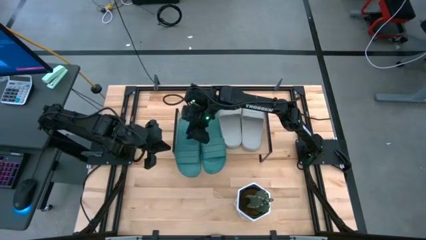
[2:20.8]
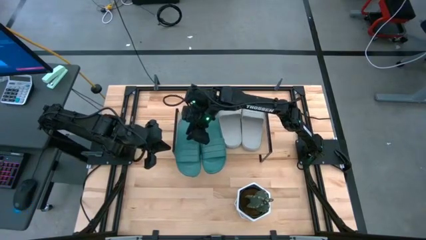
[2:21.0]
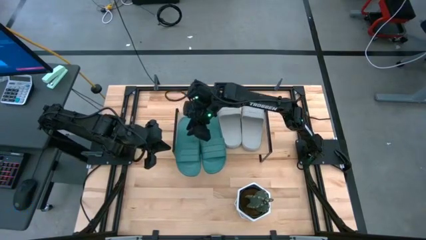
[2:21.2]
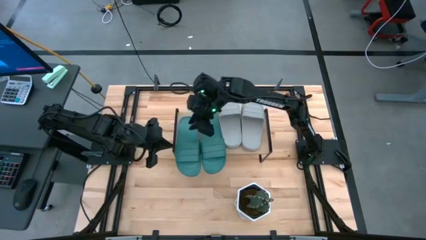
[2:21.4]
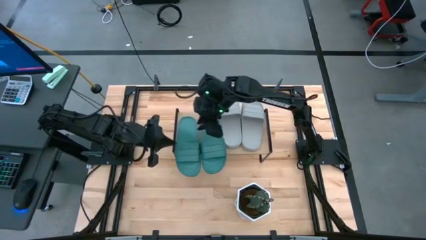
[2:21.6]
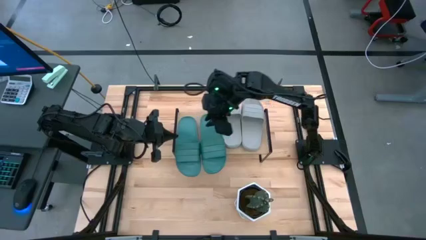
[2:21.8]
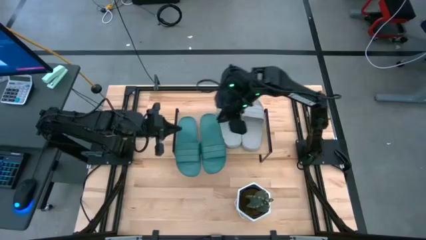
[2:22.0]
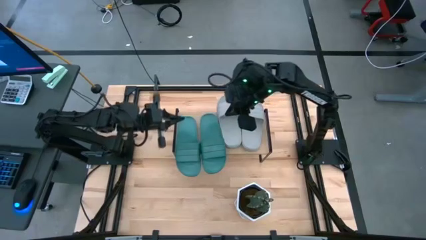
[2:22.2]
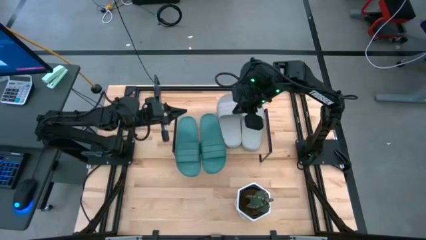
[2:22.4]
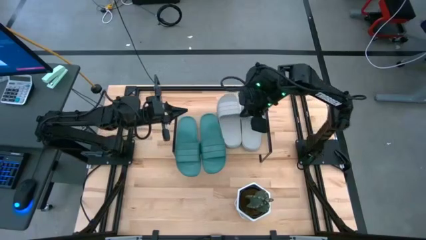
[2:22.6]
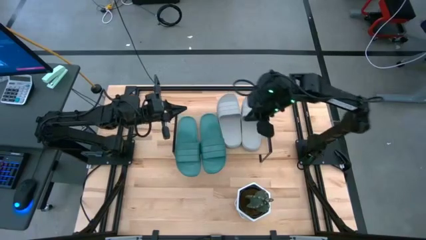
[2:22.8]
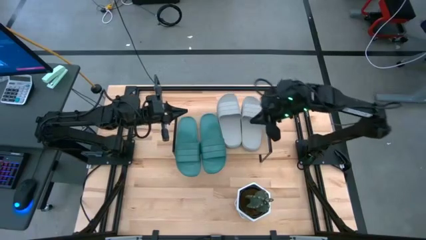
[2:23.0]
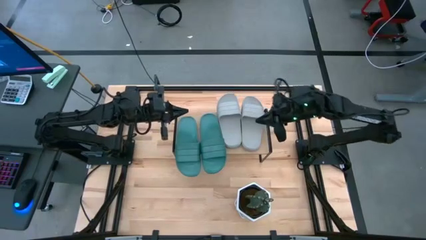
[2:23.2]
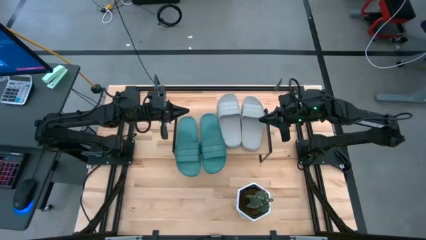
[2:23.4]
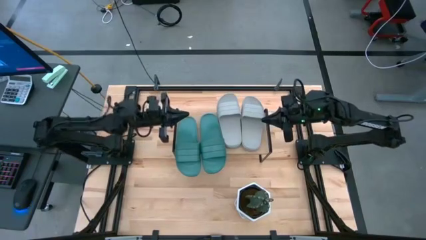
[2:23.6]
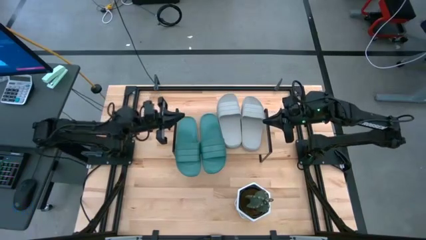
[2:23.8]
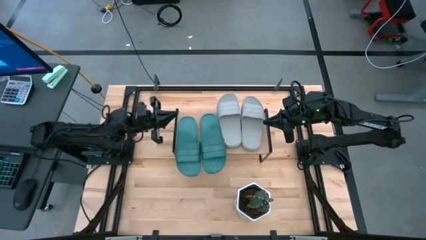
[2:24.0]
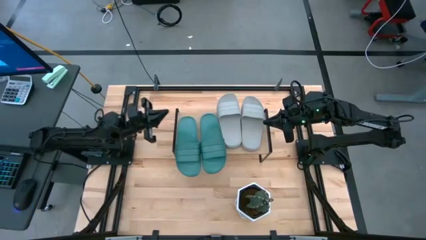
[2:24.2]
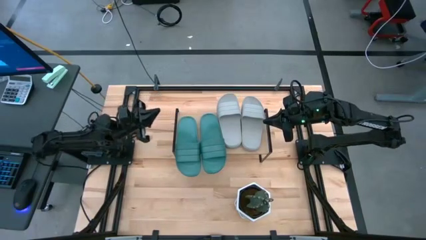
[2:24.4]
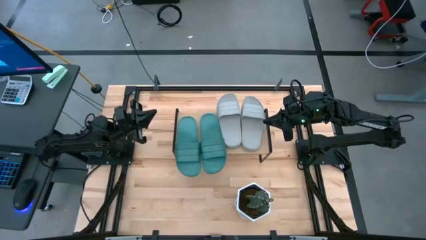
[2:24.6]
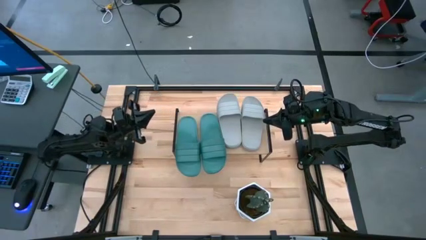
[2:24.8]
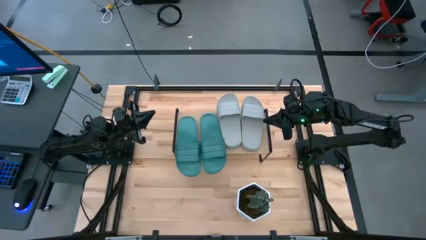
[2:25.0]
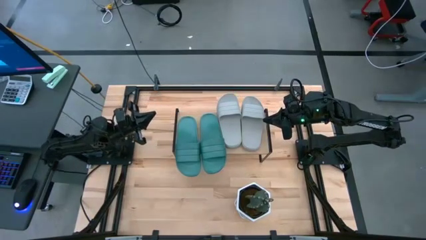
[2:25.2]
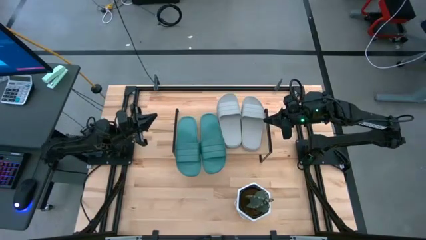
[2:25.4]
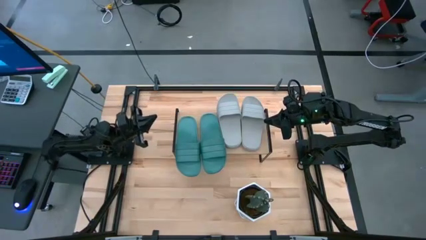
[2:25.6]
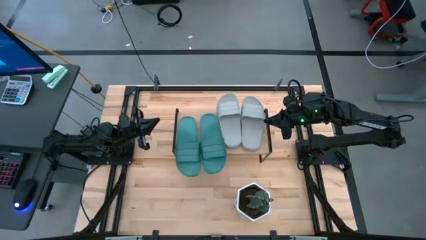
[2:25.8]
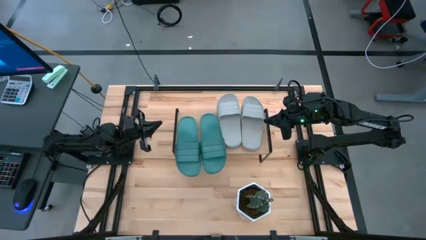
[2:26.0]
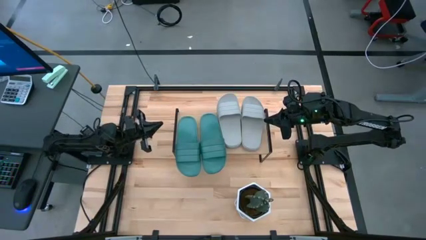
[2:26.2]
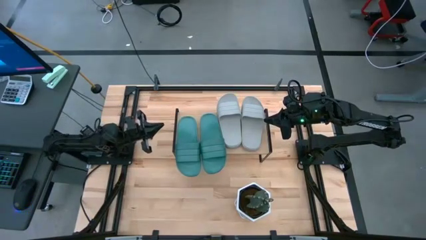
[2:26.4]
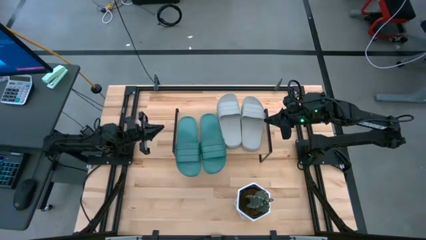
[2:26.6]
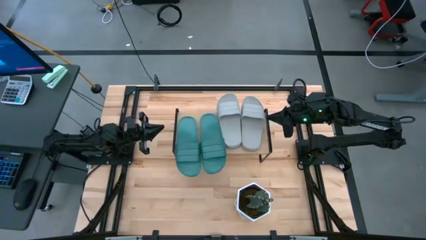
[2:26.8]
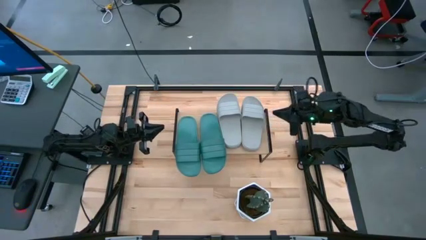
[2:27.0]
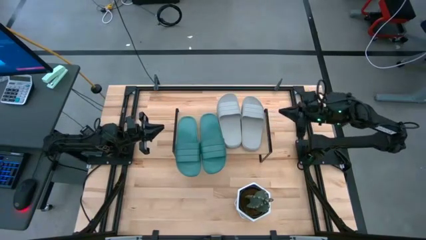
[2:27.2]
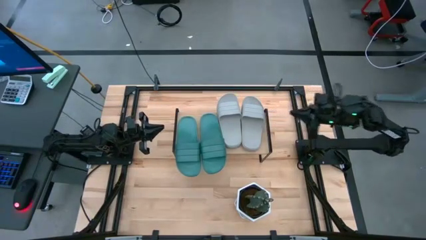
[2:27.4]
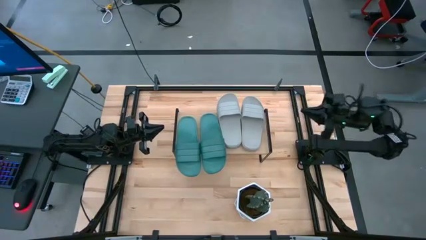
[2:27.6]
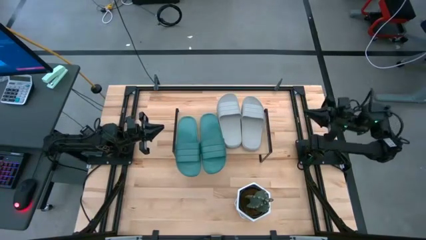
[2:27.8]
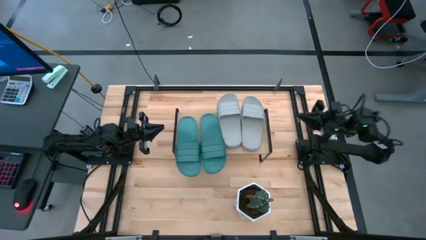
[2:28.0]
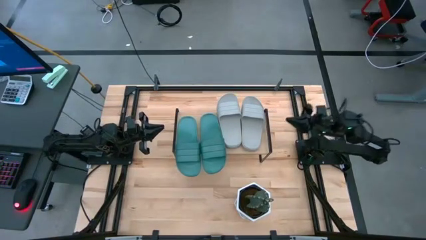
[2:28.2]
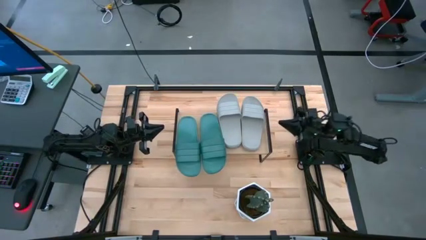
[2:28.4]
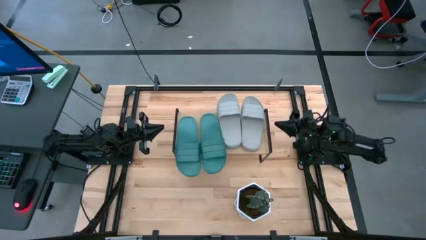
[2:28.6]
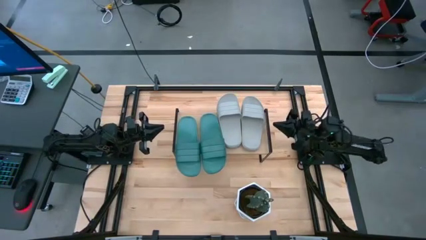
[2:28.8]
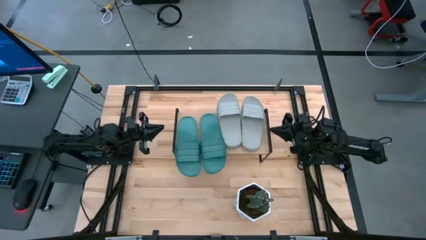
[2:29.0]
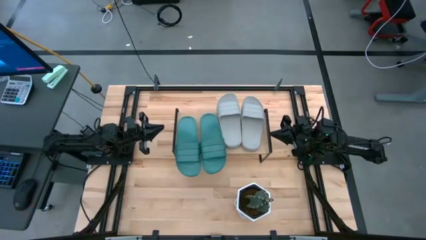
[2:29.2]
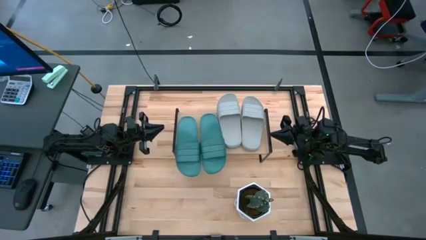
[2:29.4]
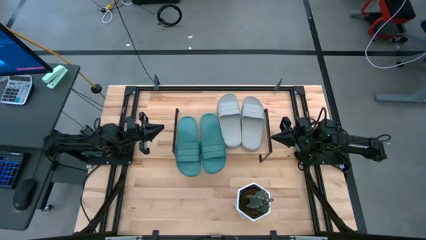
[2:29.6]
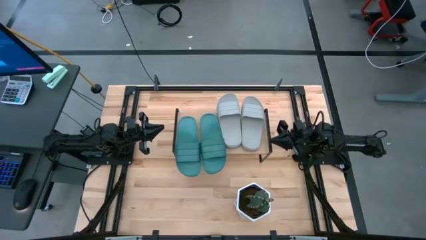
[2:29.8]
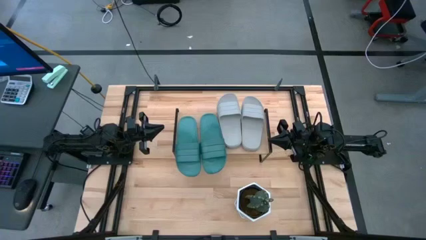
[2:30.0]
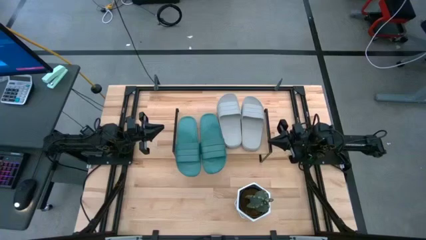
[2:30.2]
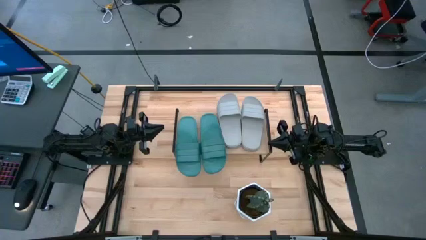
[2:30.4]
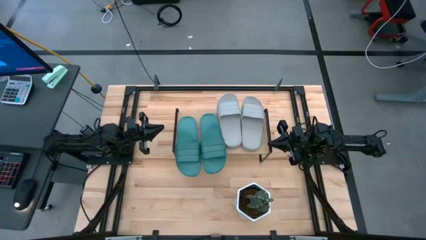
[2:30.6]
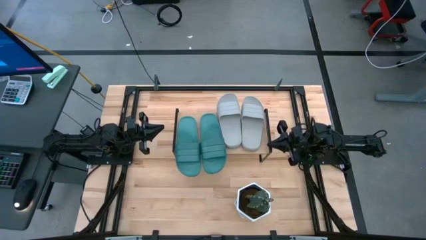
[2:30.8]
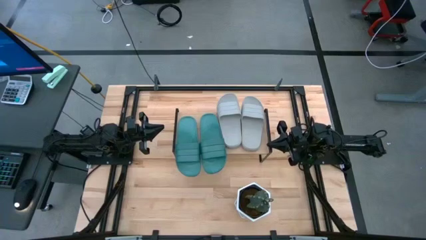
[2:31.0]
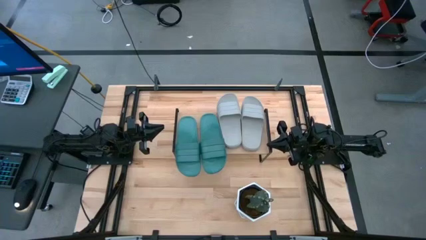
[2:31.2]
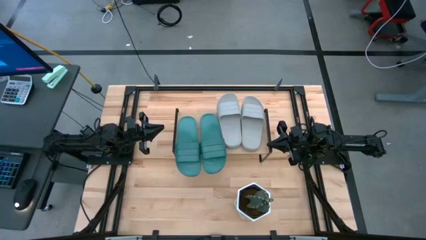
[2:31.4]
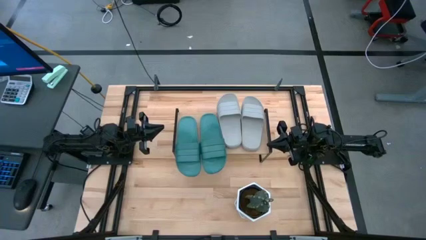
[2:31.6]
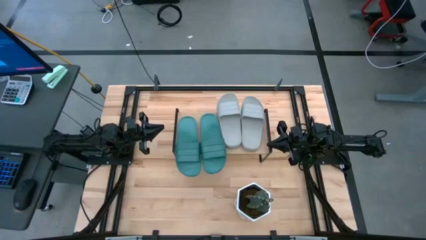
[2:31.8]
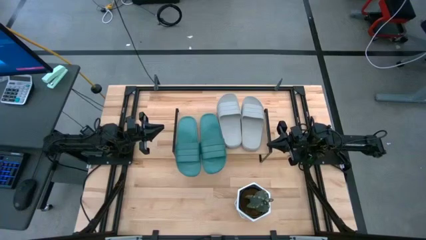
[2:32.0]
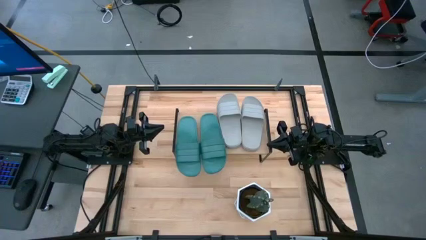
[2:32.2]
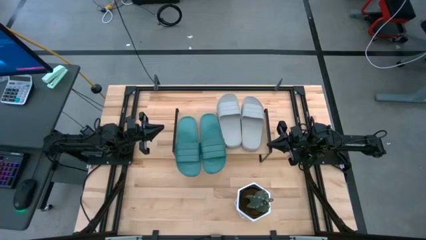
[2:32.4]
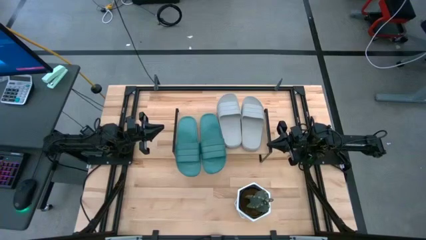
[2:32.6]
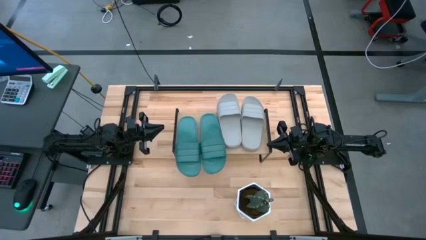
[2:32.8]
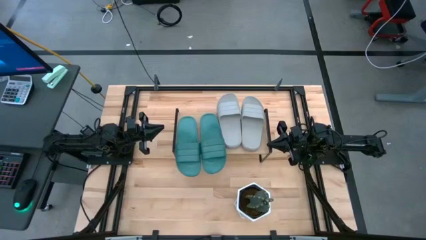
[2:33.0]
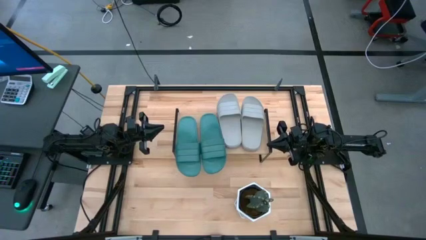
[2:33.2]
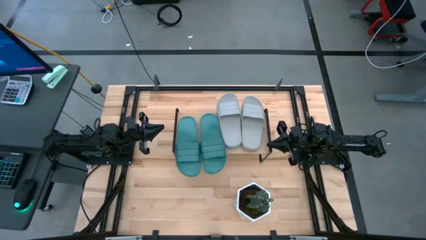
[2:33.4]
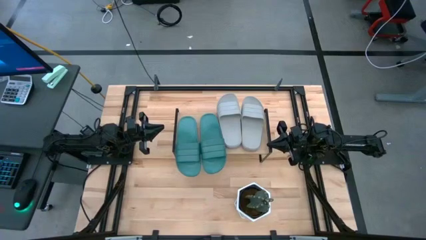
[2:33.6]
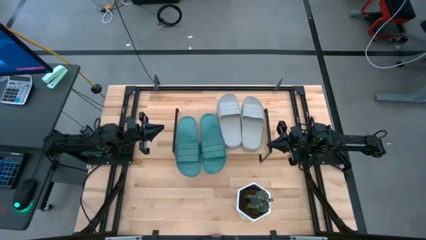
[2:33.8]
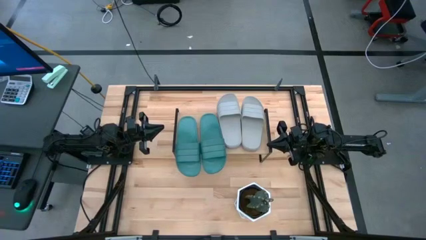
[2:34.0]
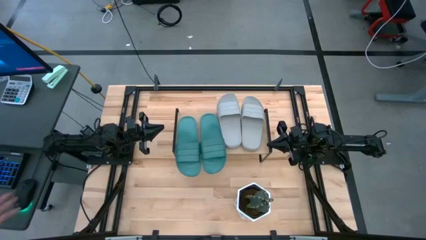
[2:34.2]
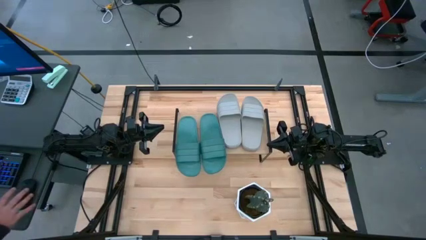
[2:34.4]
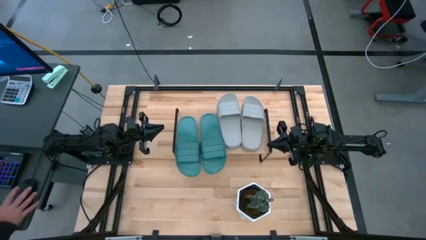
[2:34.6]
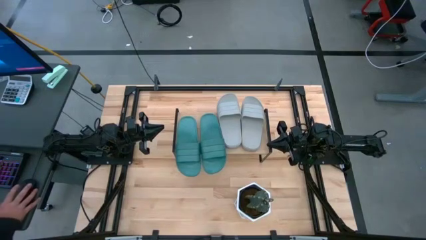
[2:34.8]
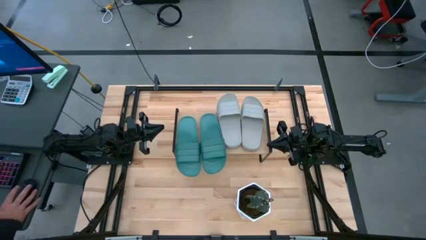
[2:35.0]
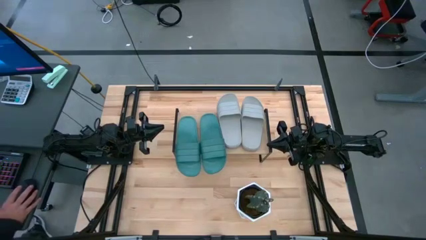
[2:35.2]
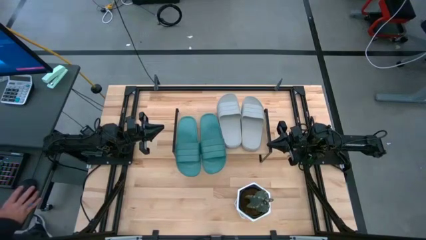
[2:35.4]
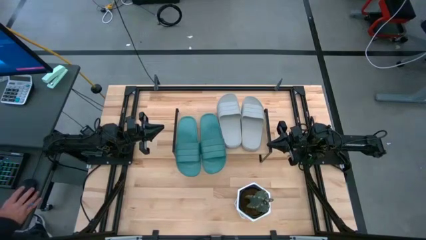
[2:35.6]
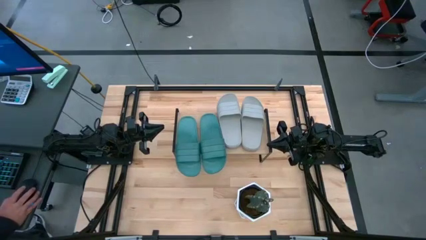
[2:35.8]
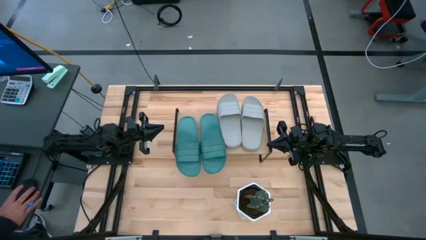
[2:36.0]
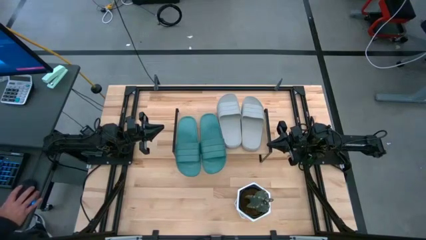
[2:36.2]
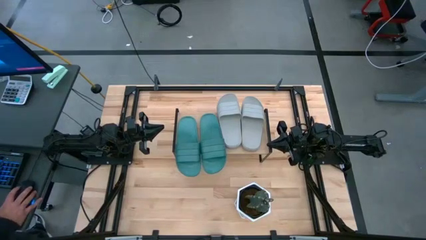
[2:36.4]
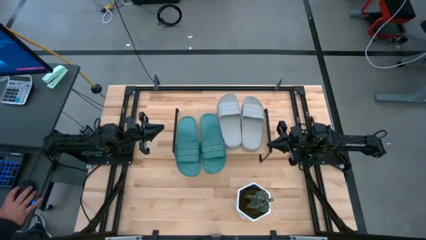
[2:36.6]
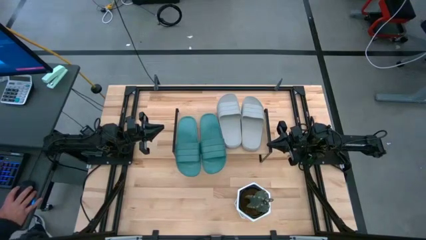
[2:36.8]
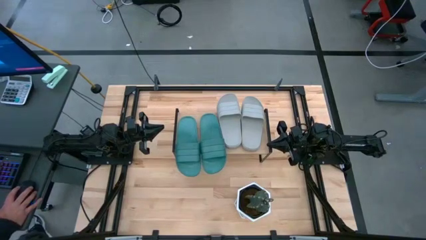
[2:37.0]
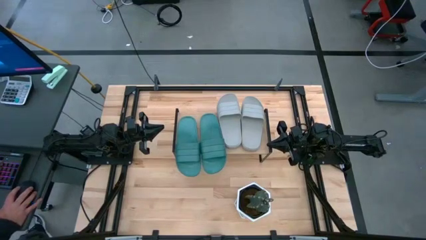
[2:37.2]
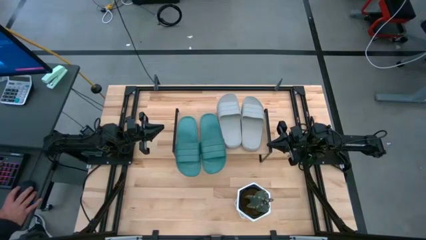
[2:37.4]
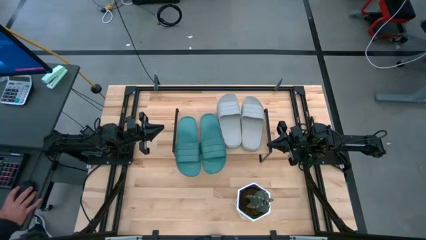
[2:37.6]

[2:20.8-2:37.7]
Task: Pick and place slides into the shelf
Return to Home Position
